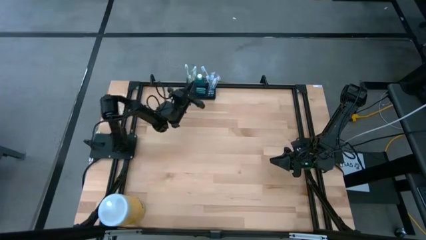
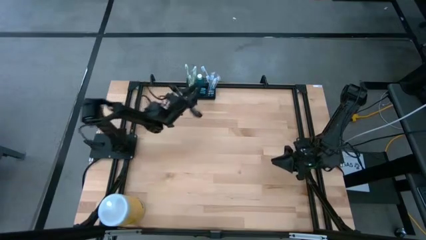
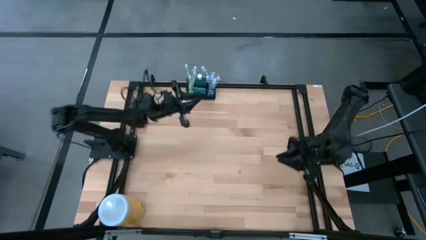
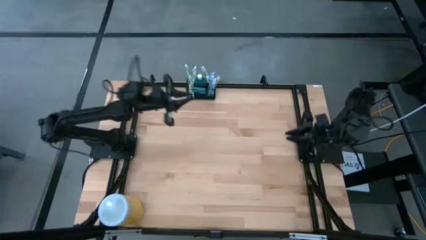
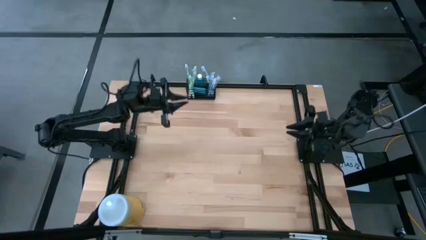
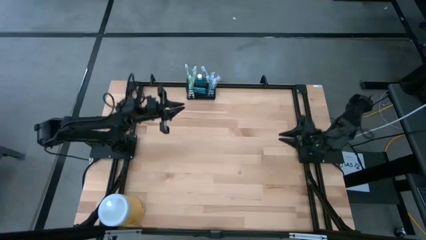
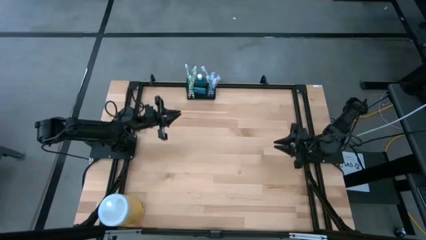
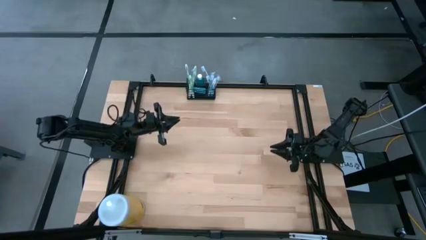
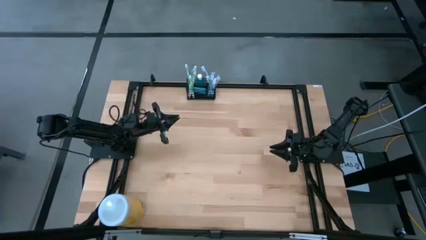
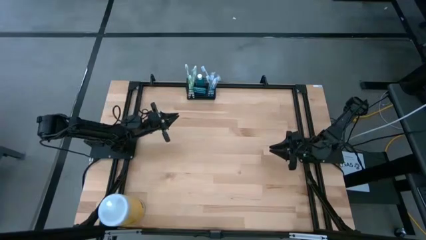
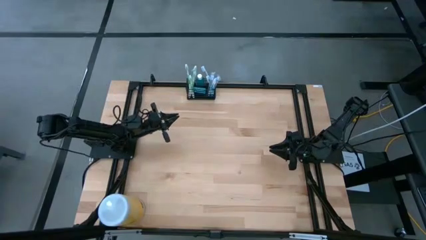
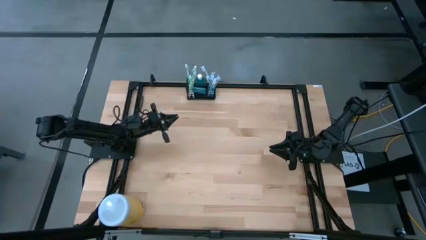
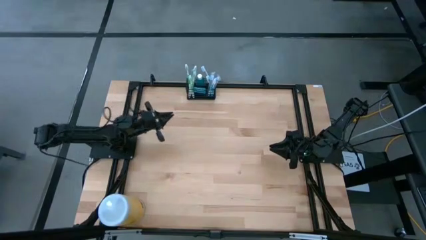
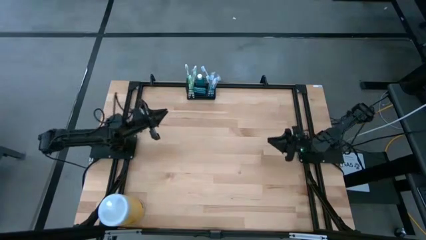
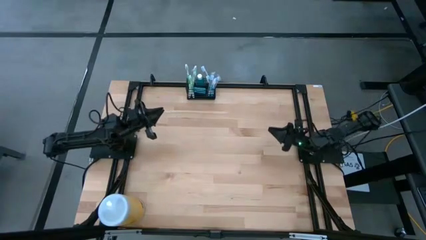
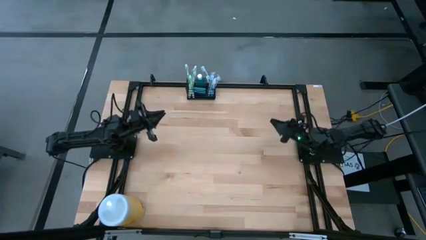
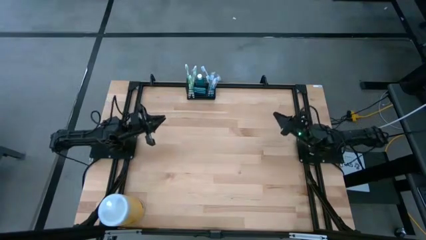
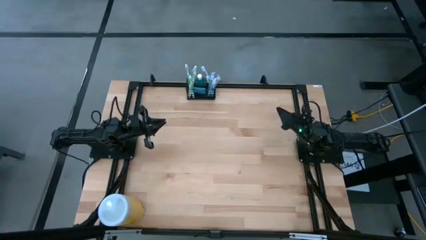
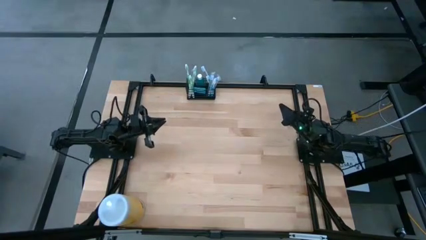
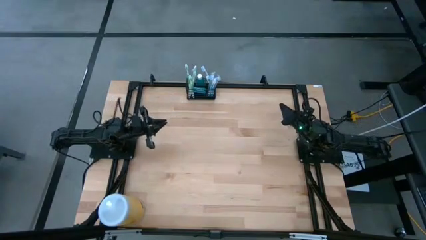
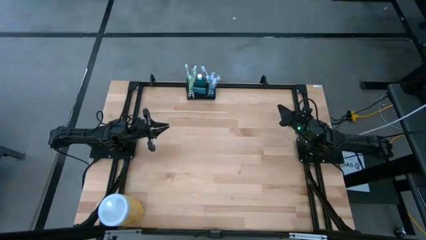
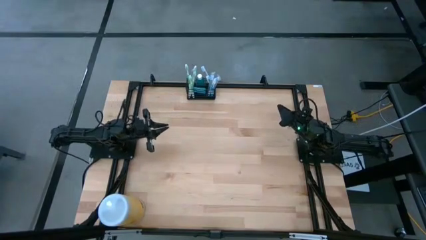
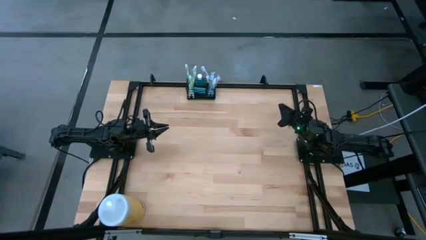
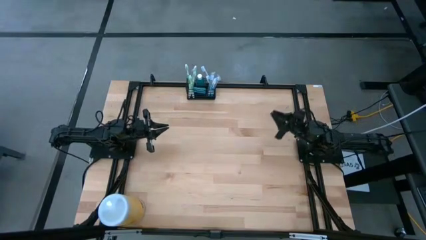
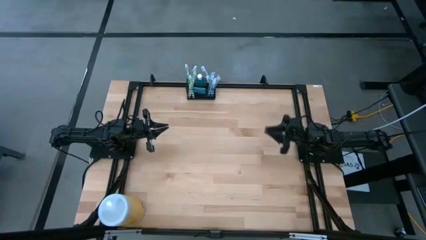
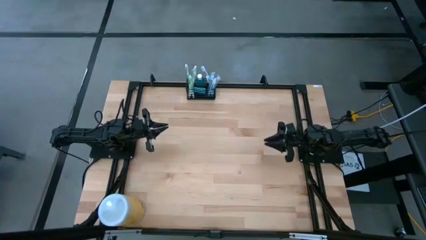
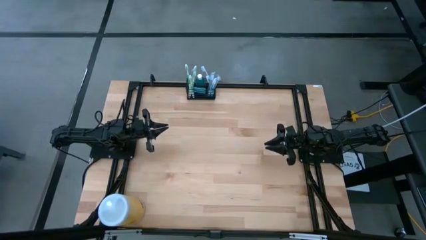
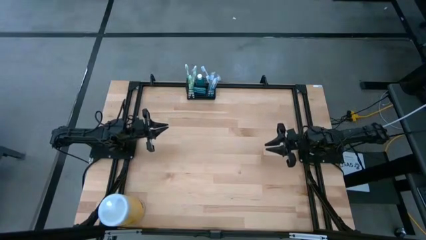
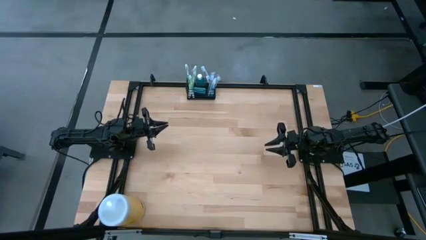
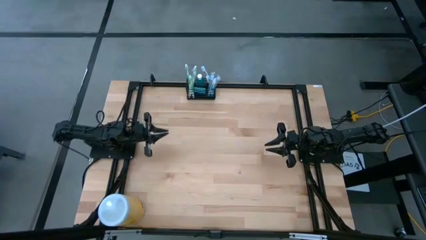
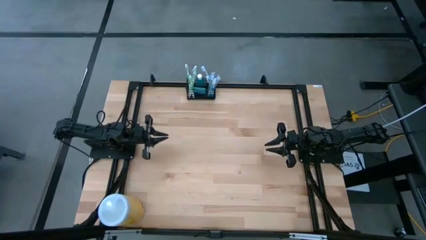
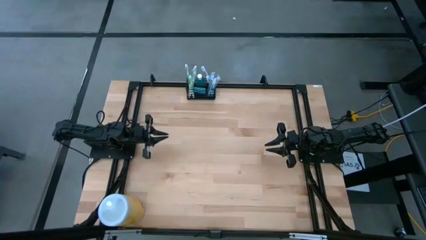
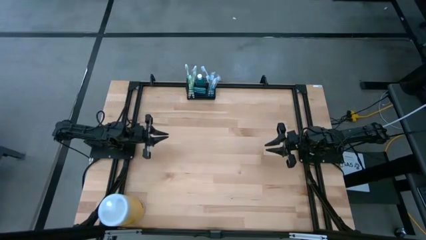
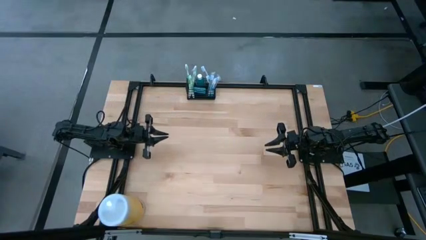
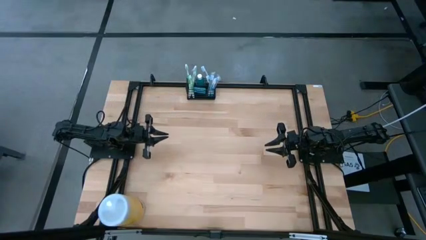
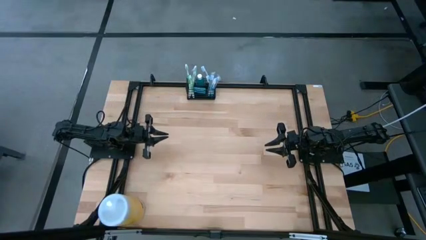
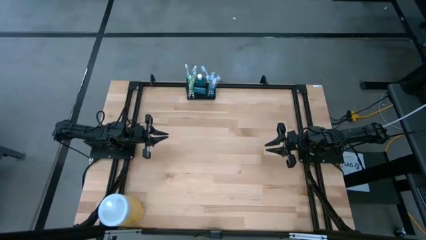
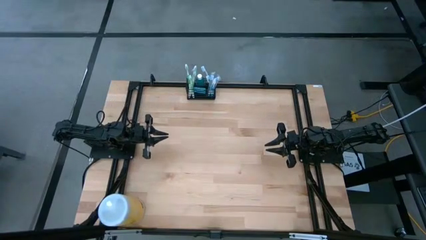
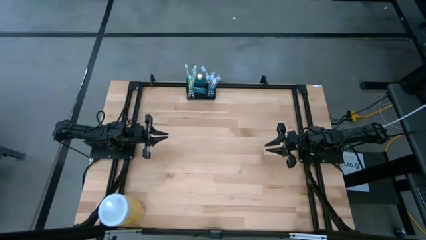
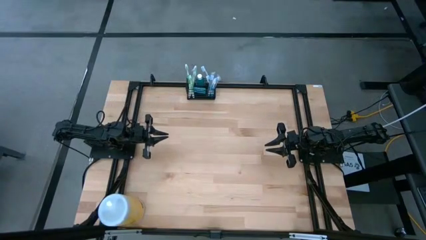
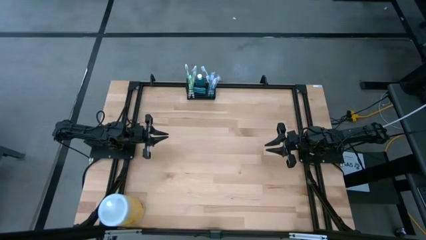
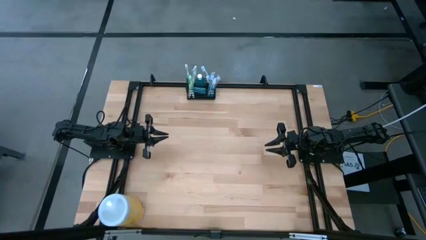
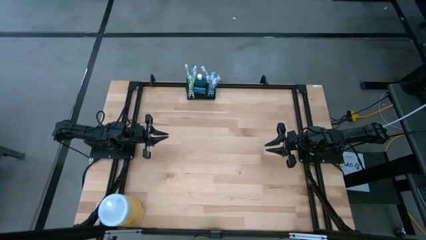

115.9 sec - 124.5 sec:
Task: Pick & Place toothbrushing station
Return to Home Position

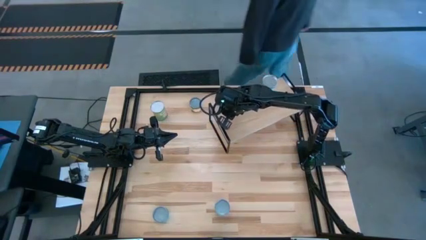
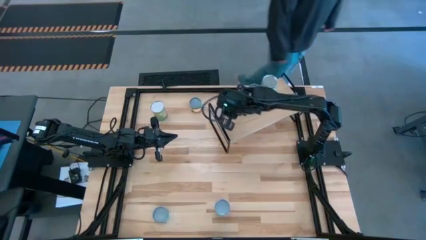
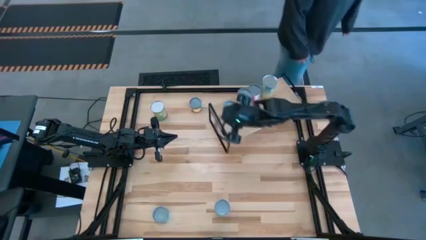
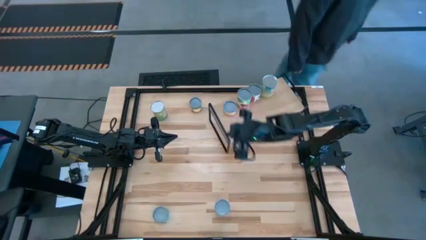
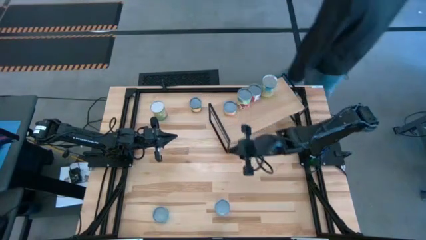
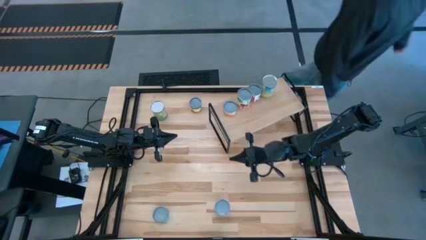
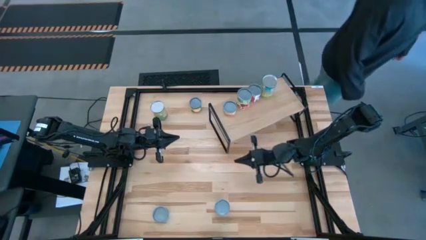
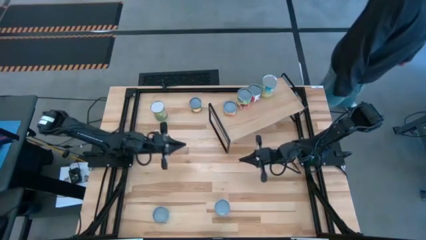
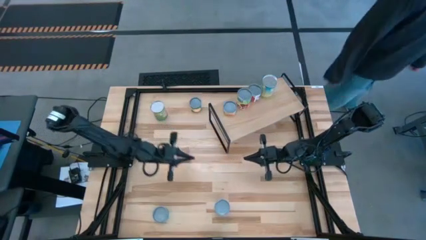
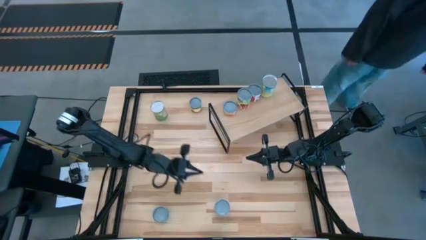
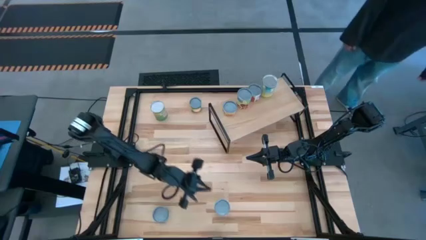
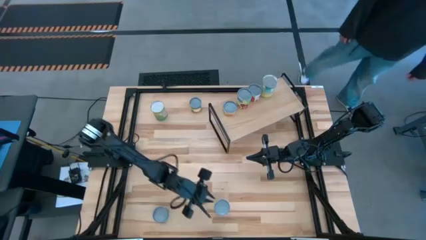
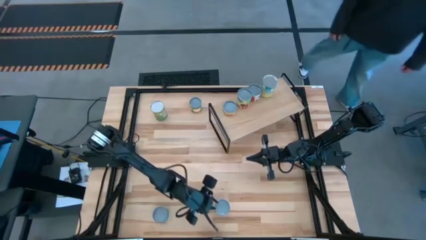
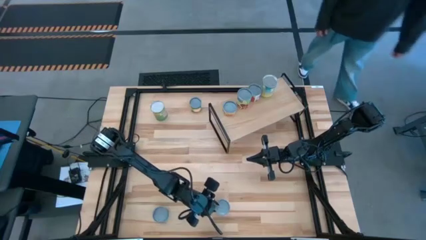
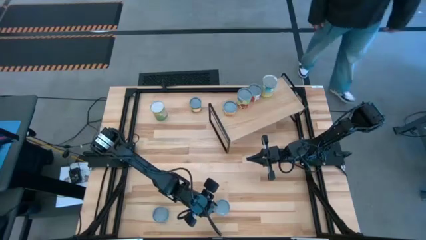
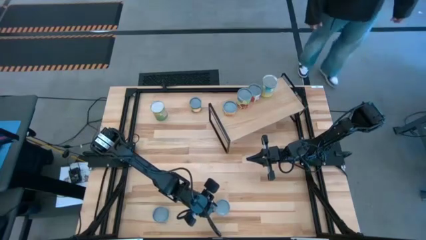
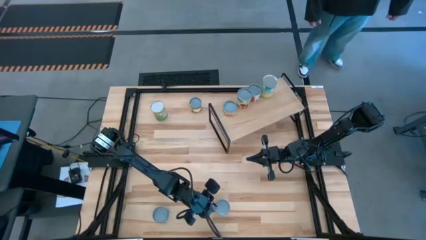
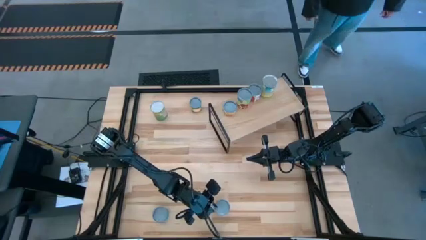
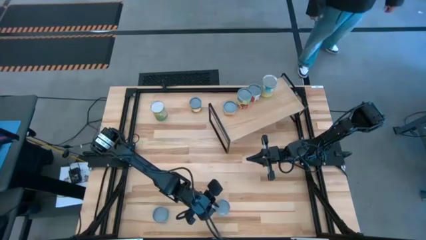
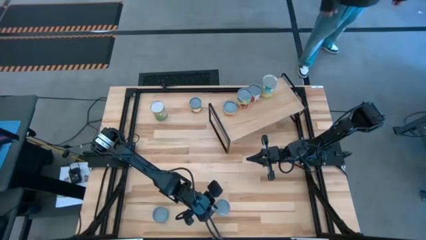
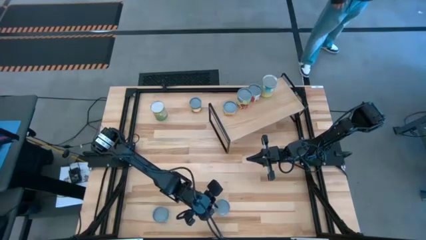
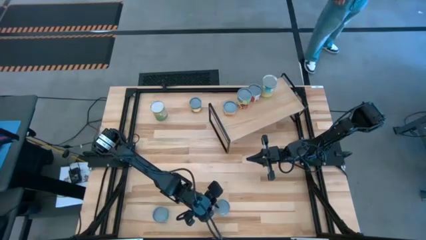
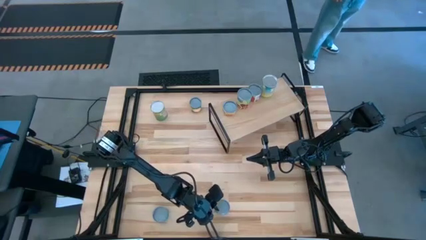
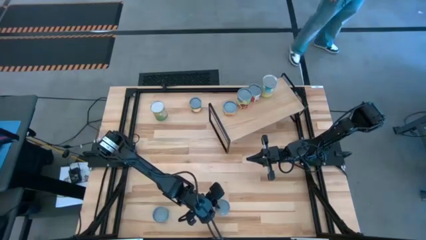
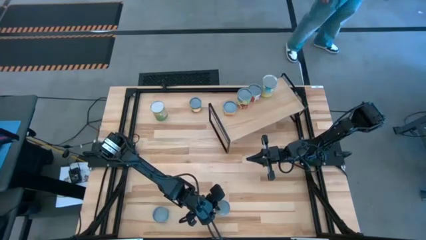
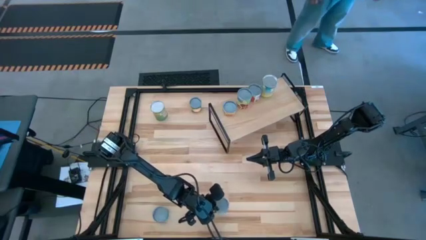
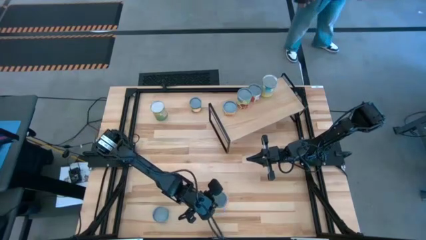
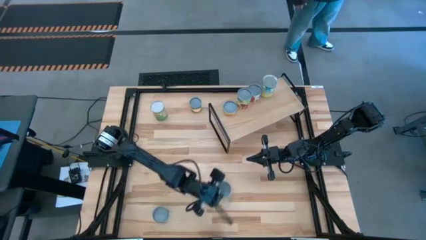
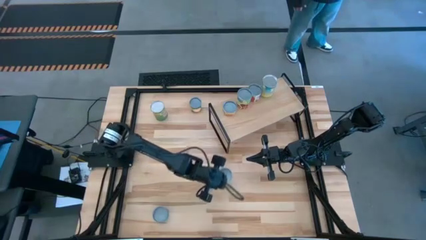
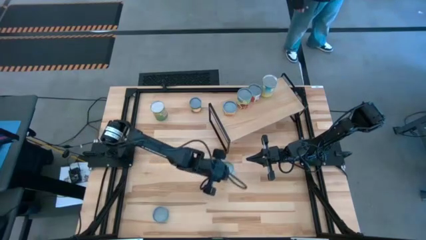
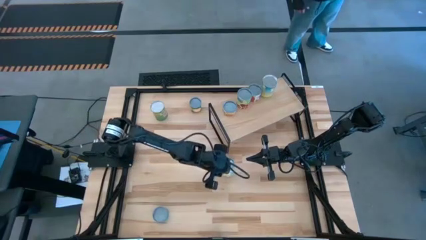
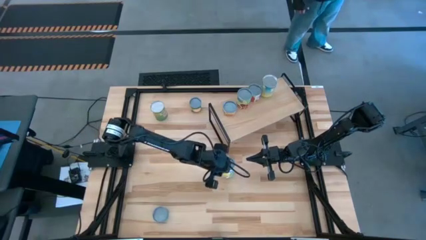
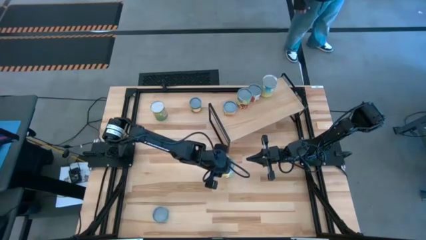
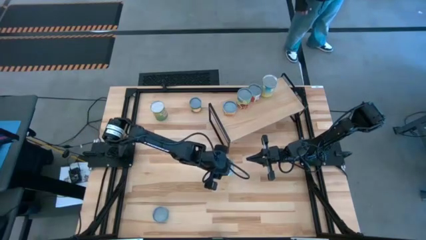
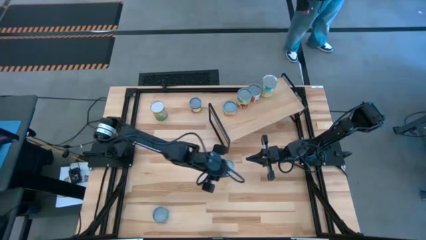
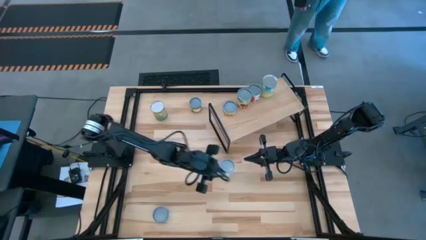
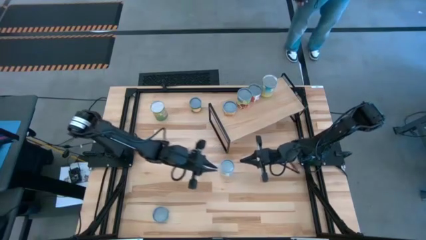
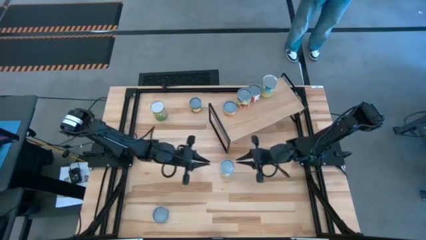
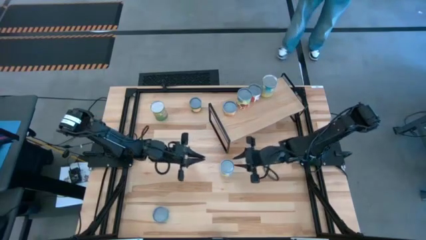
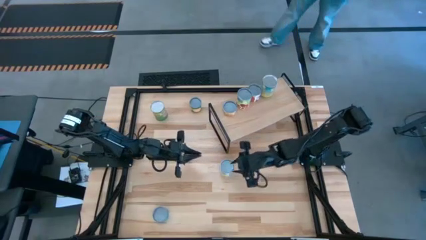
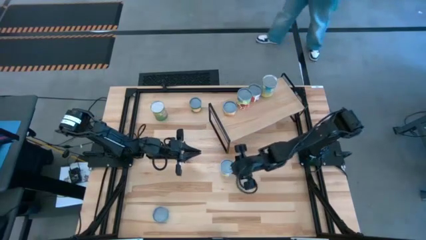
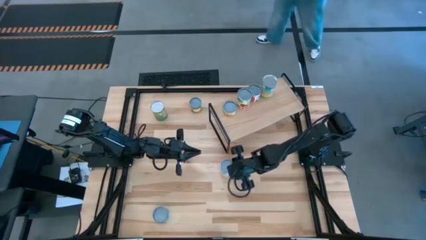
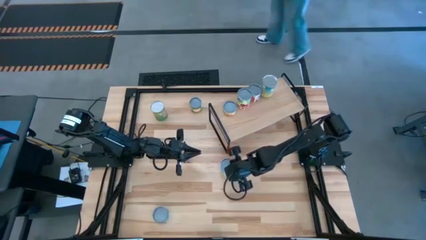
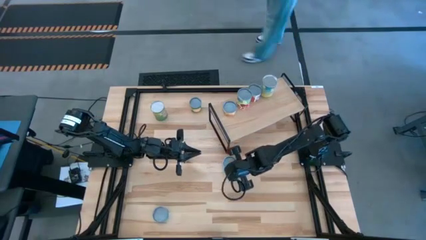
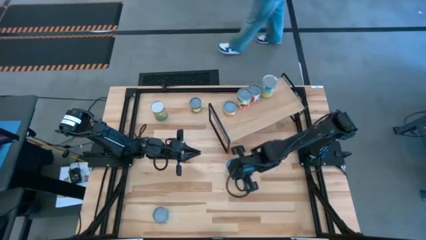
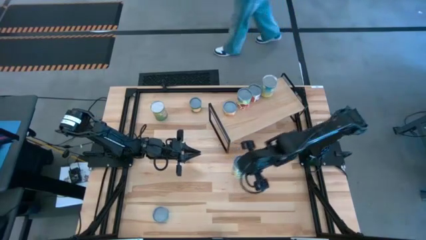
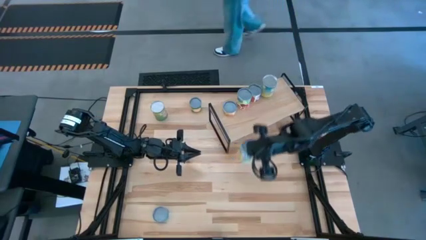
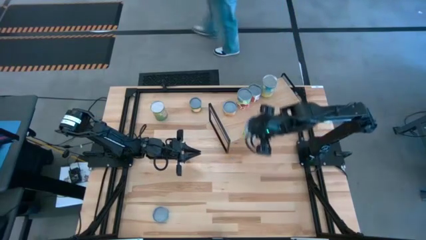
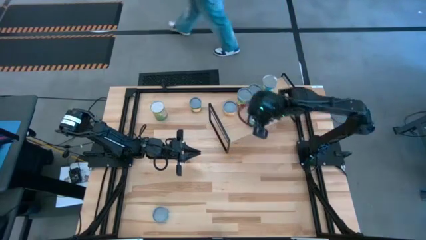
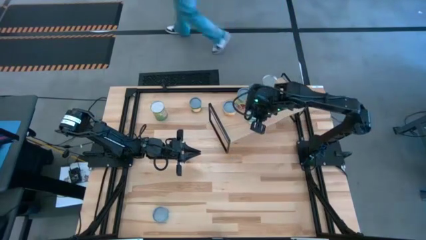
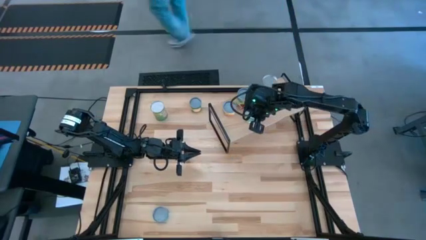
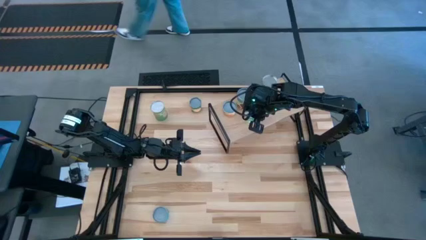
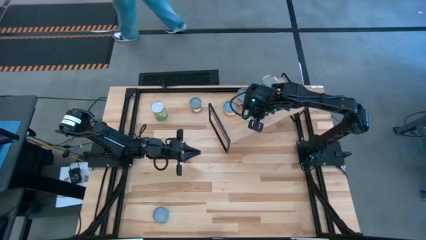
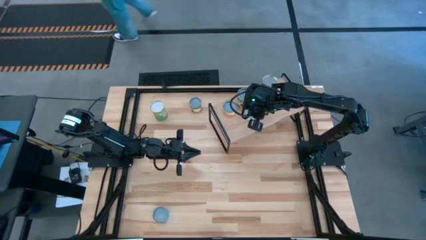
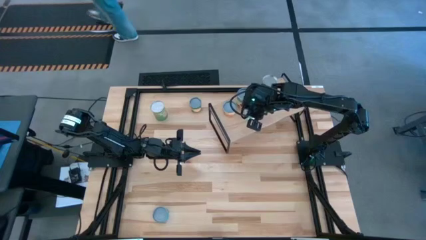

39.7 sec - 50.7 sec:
Task: Pick and place cans onto a shelf
Put the canned mix fruit on the shelf
